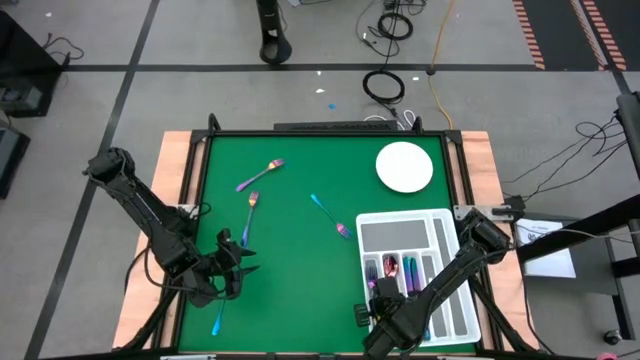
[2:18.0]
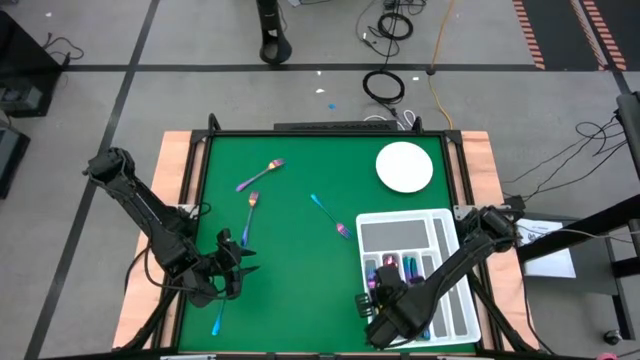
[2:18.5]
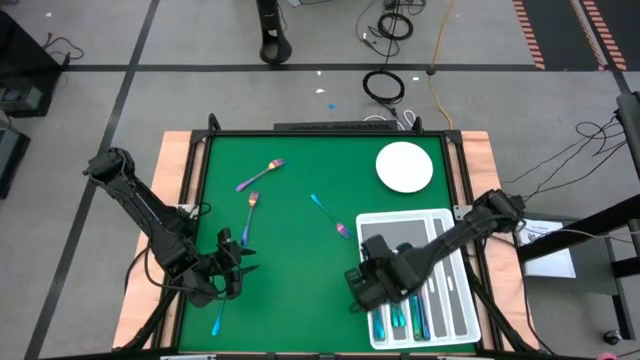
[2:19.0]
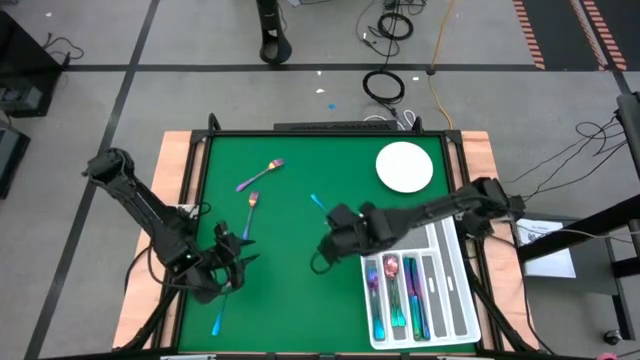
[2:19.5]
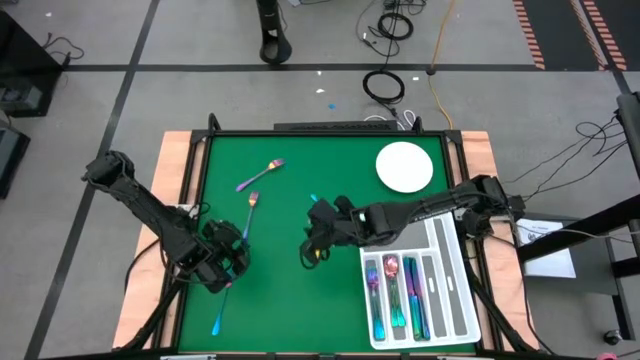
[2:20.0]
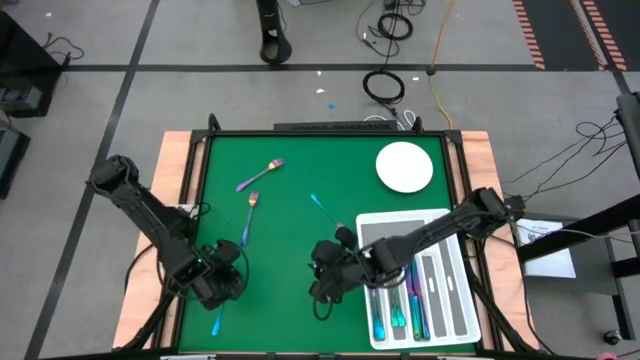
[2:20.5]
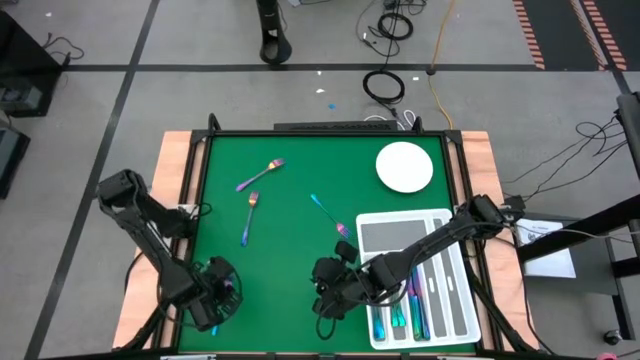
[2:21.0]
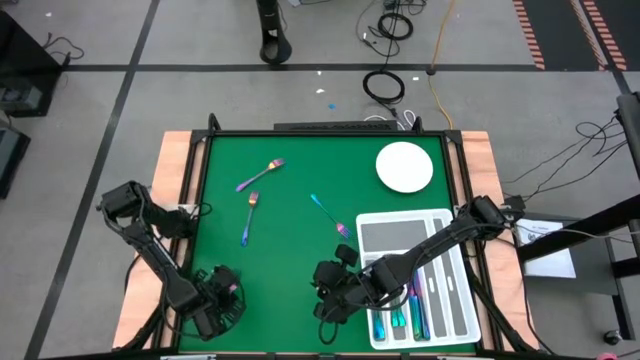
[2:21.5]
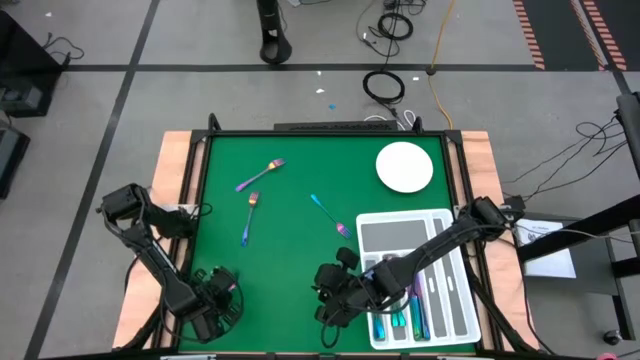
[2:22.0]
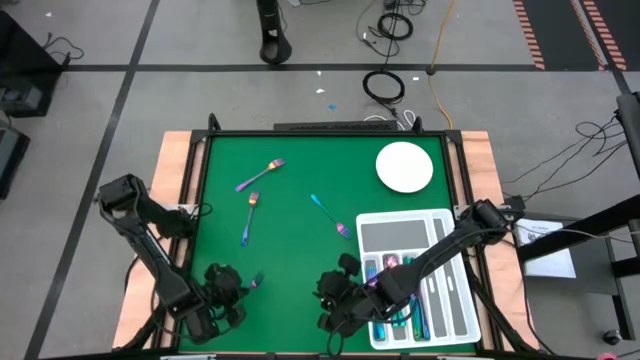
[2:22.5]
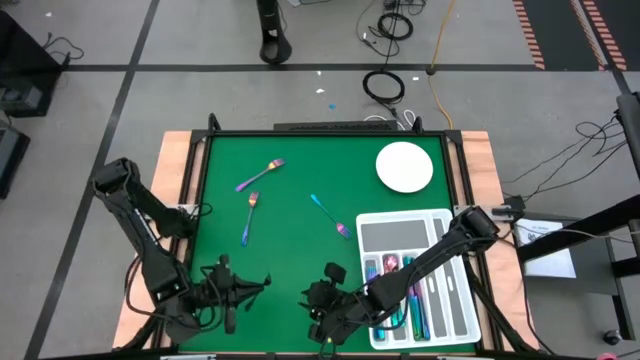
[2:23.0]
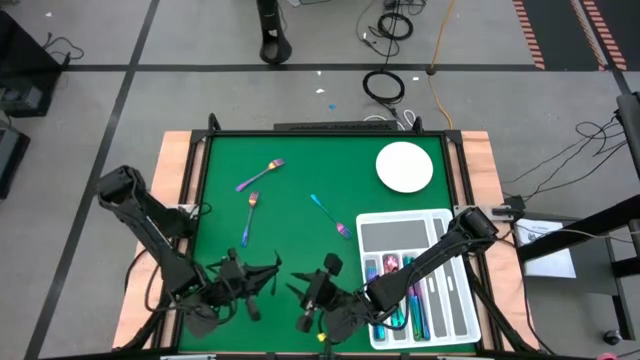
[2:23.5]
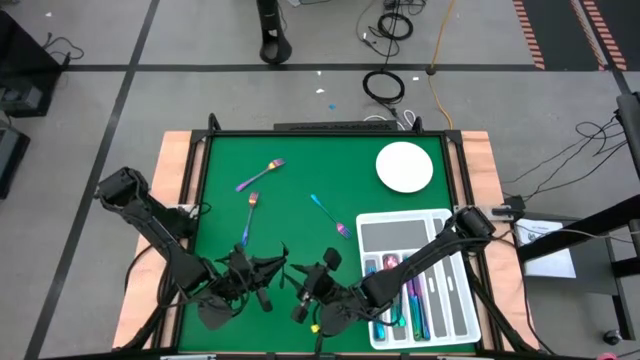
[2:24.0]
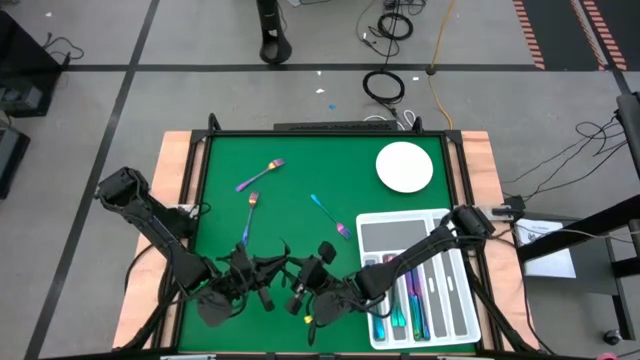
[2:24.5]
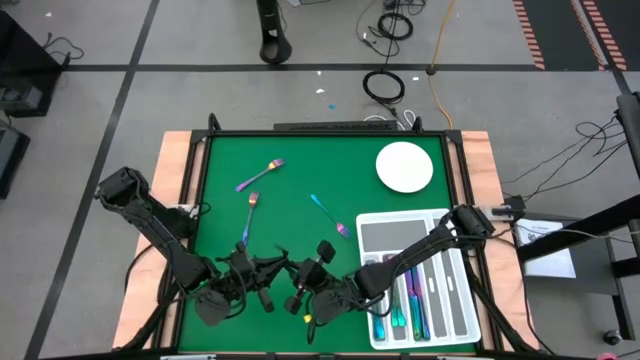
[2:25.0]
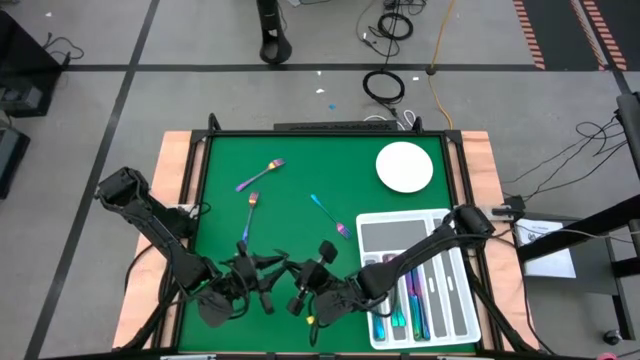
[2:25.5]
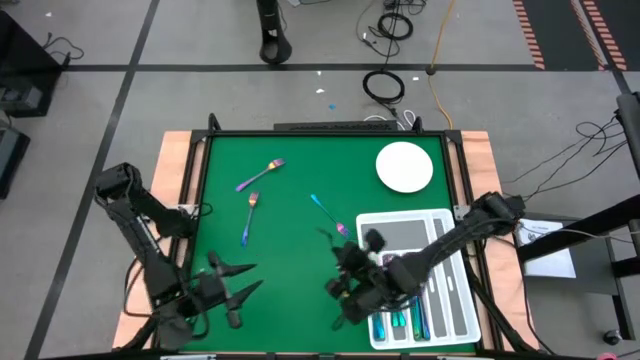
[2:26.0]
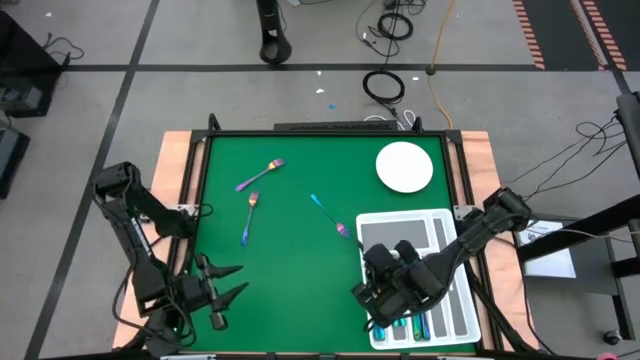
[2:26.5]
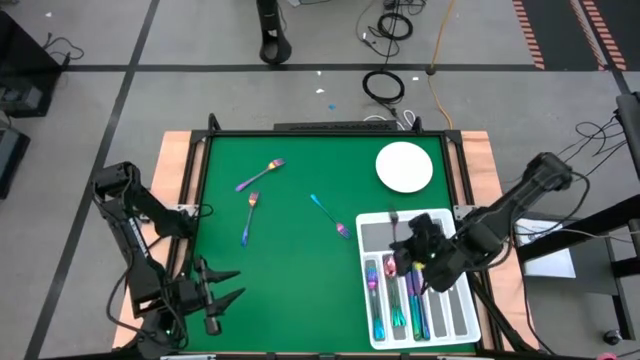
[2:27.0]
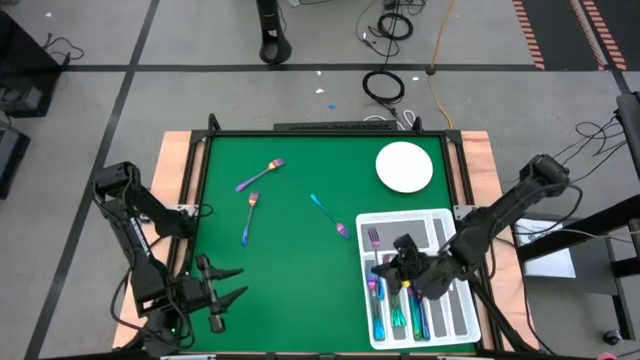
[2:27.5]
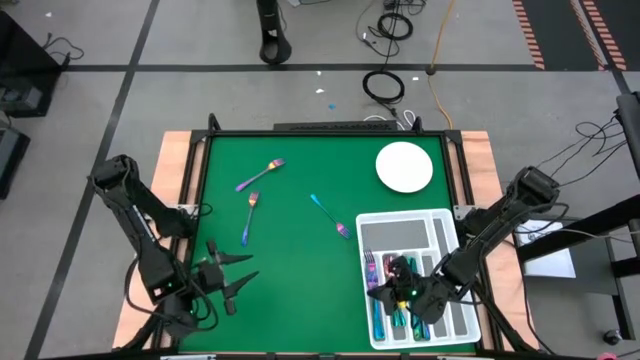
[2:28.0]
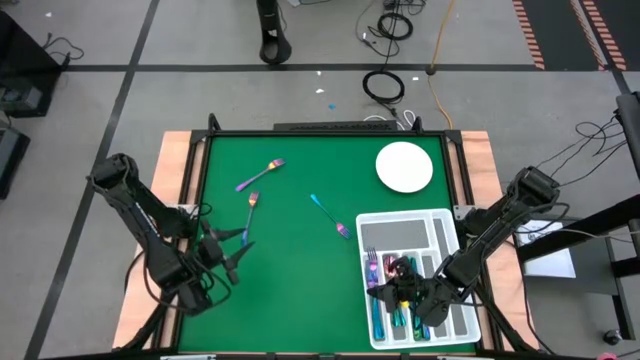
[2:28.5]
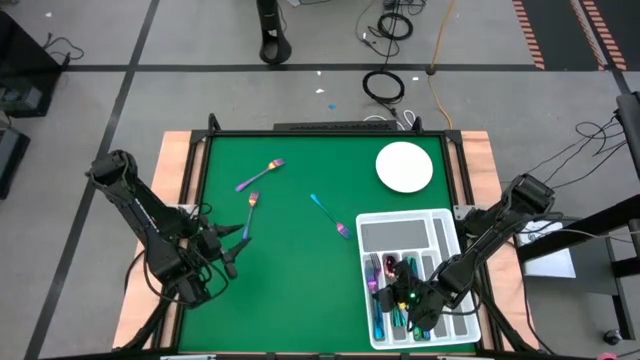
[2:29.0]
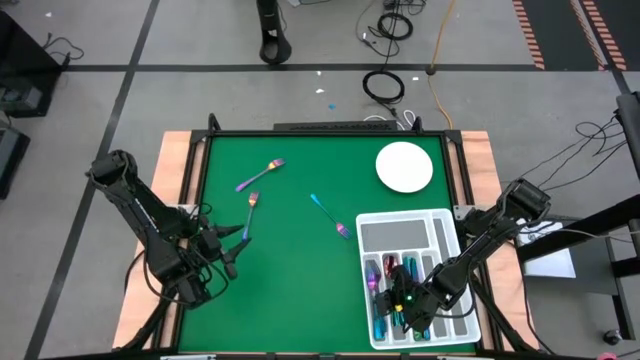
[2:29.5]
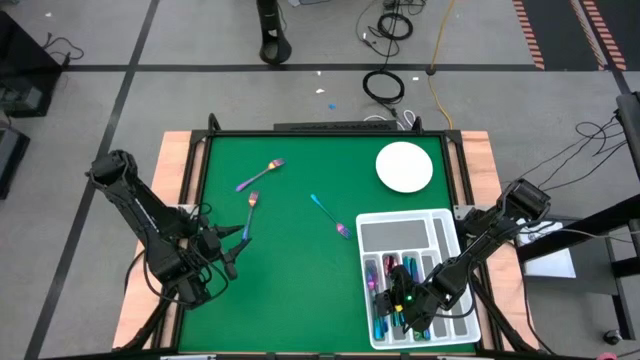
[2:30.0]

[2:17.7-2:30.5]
Task: Sort silverware
Put the bottom left fork into the utensil organizer

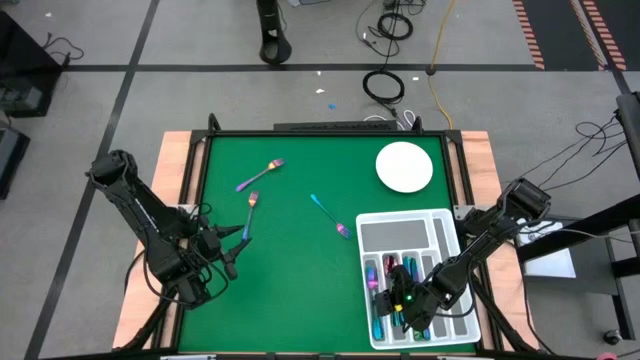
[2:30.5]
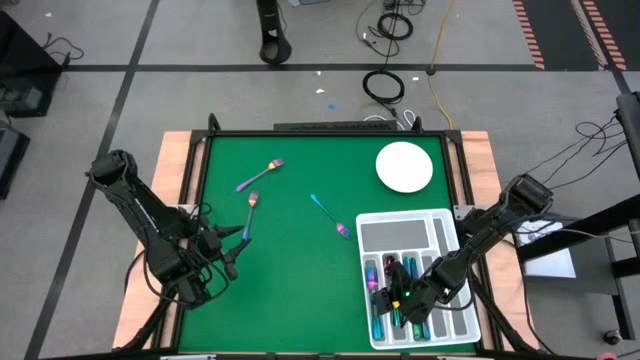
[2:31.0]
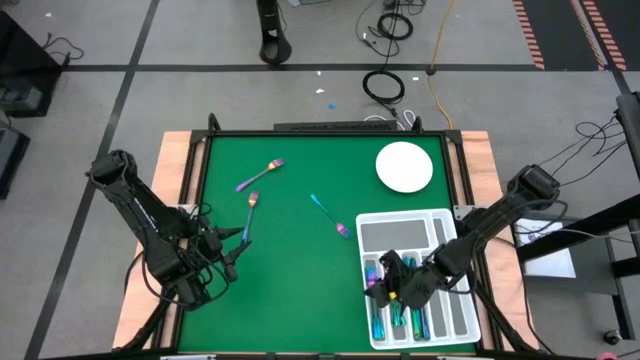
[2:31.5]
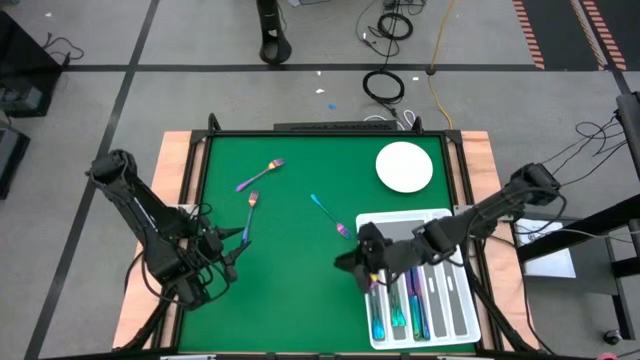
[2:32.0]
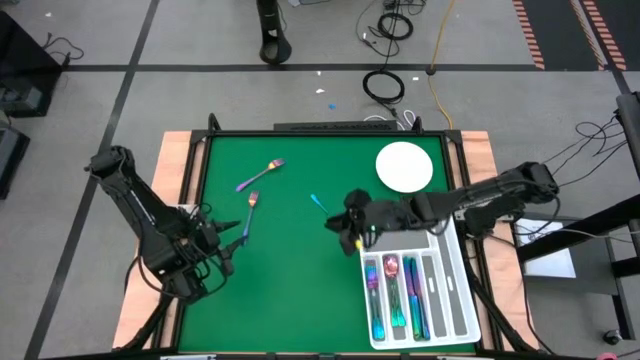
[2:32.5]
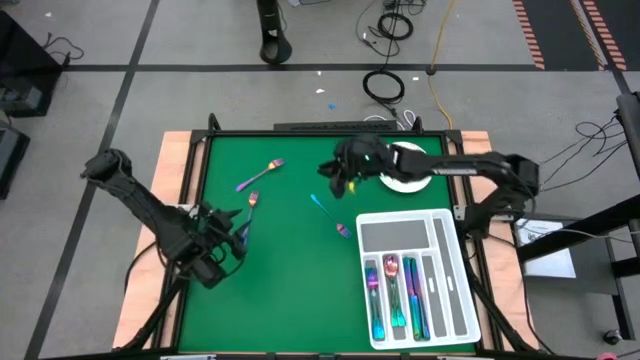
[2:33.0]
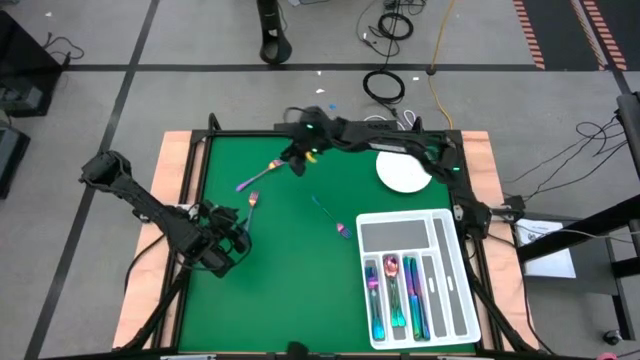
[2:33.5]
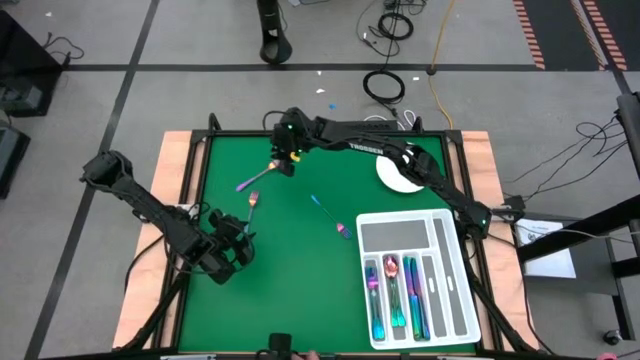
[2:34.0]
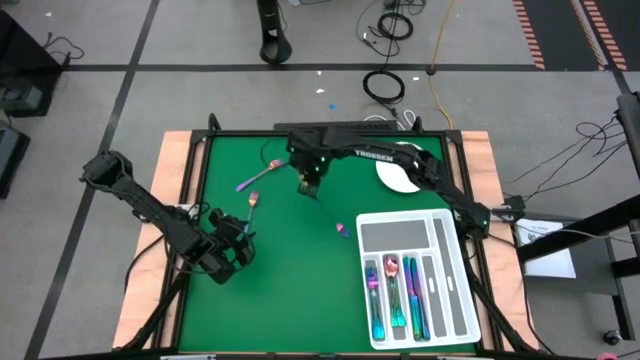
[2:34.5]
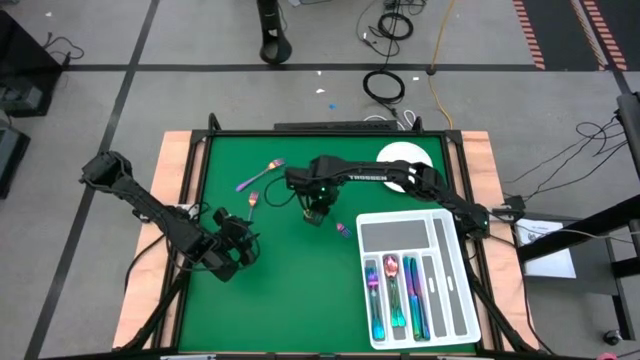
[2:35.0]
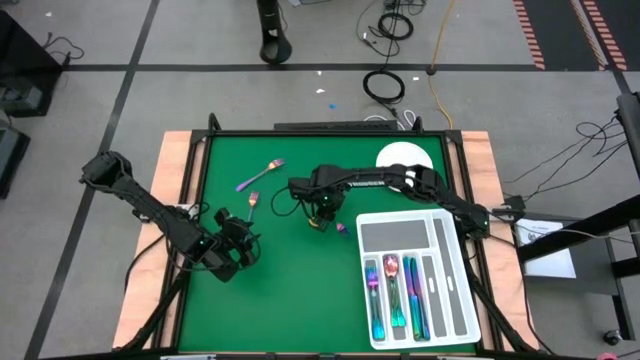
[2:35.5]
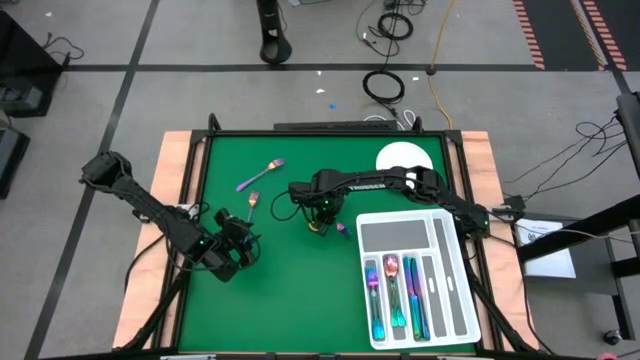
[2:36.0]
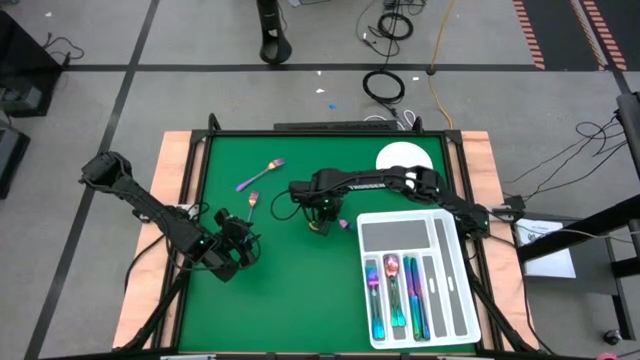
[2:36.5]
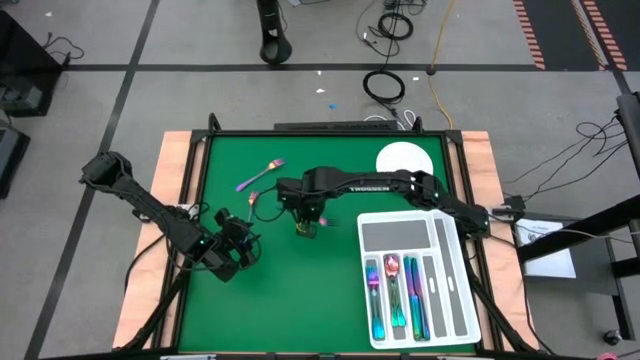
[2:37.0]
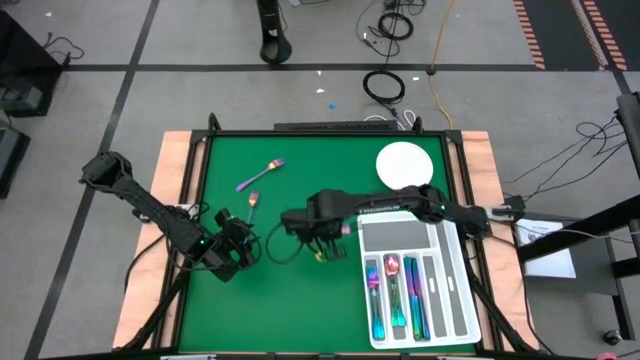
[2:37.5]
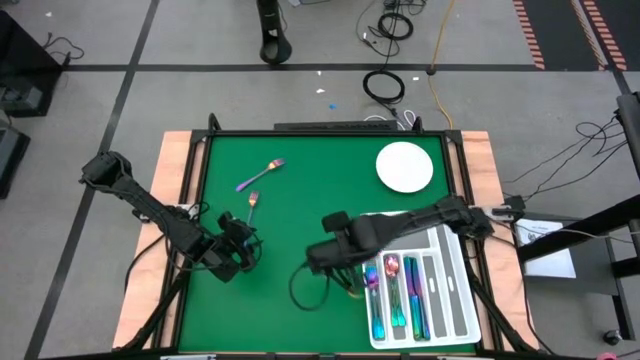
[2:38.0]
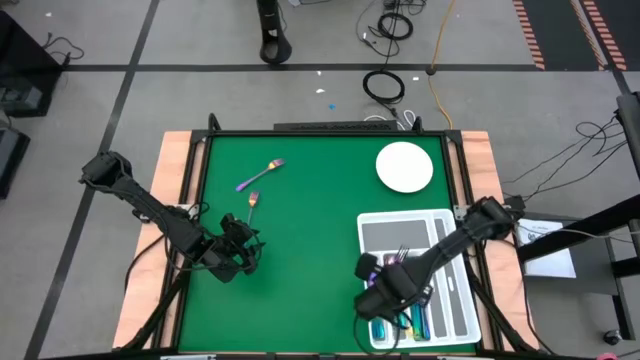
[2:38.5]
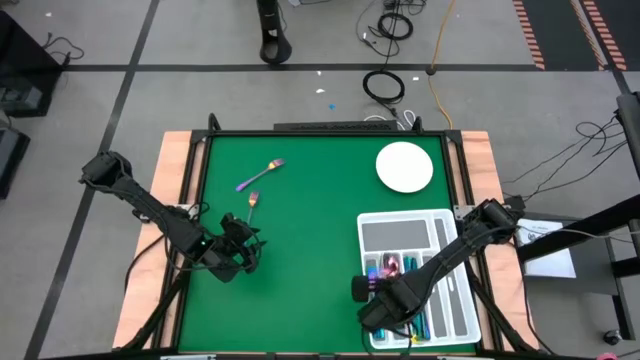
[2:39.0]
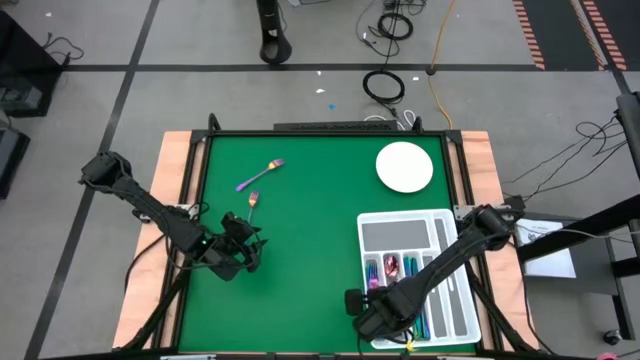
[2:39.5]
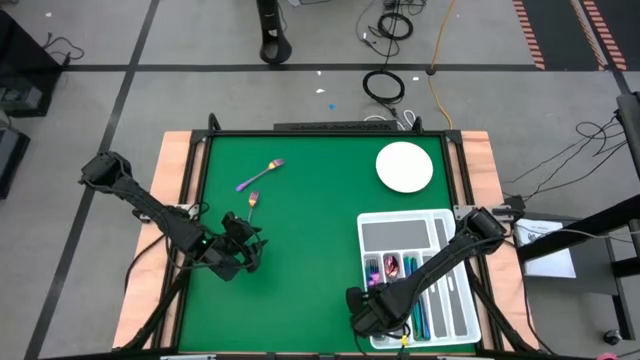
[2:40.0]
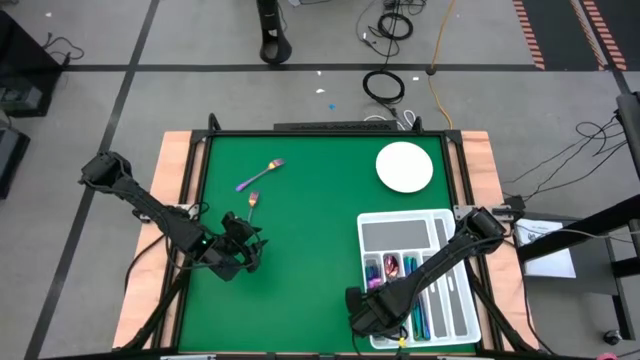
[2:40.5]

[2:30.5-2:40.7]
Put the bottom right fork into the utensil organizer
